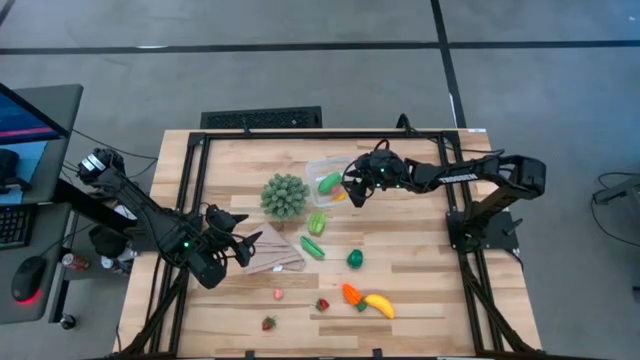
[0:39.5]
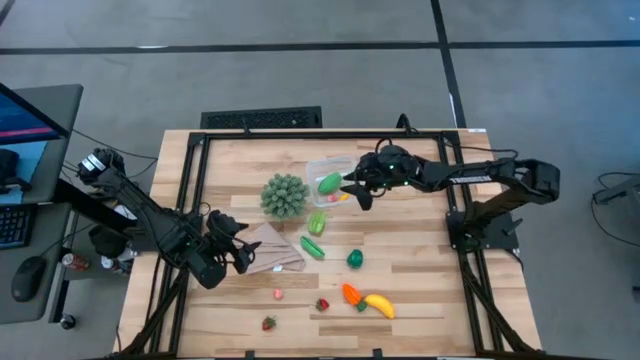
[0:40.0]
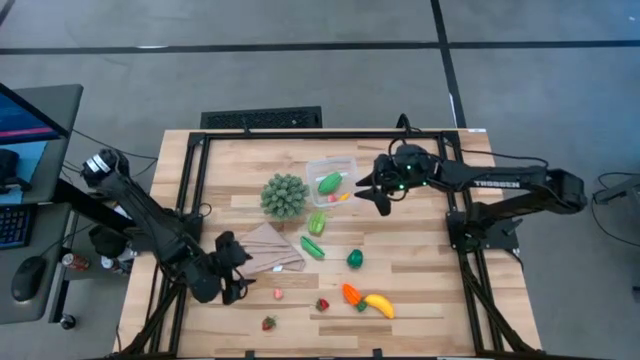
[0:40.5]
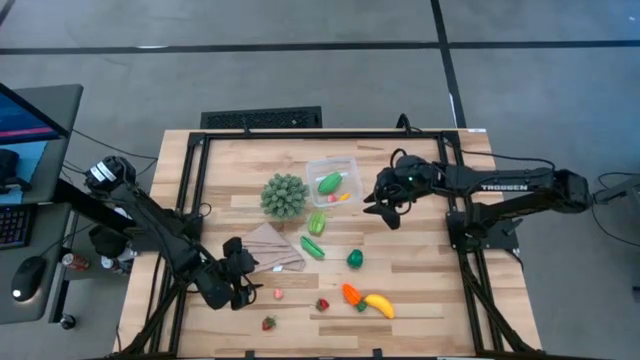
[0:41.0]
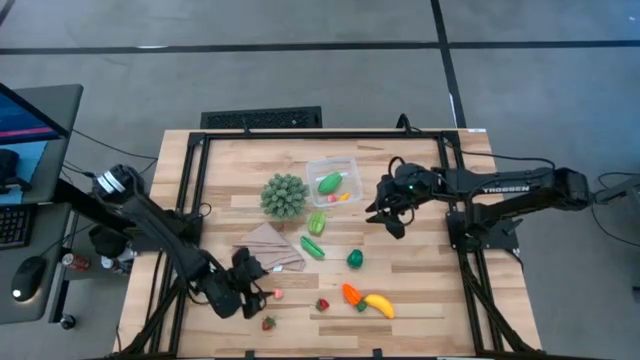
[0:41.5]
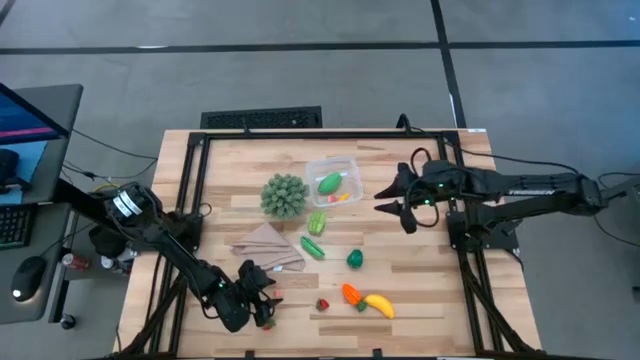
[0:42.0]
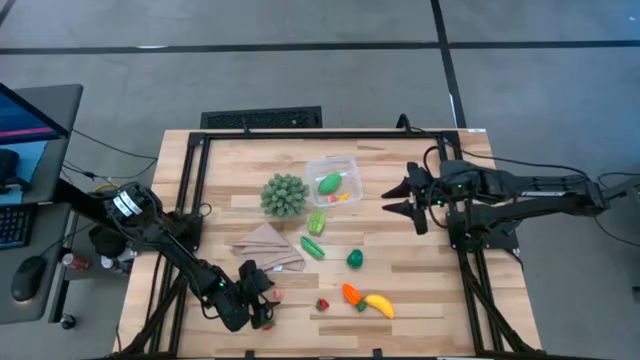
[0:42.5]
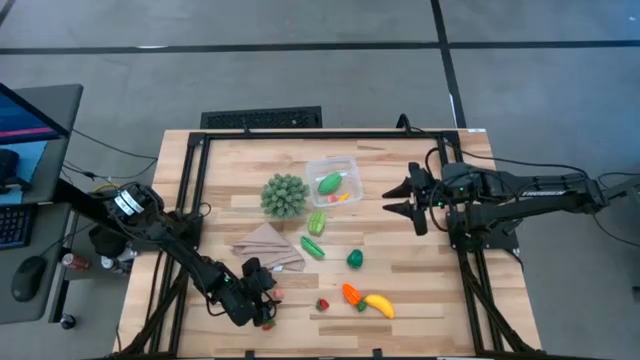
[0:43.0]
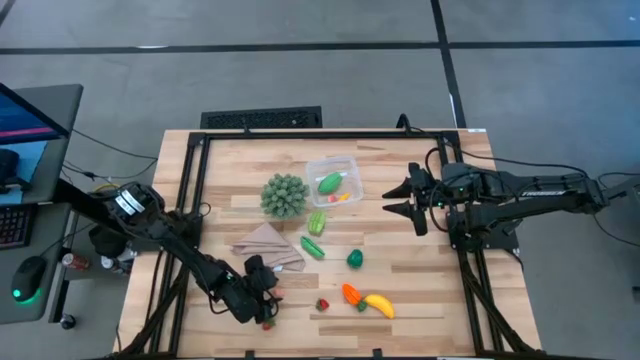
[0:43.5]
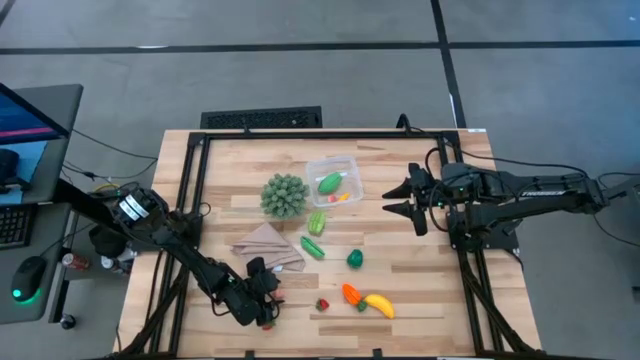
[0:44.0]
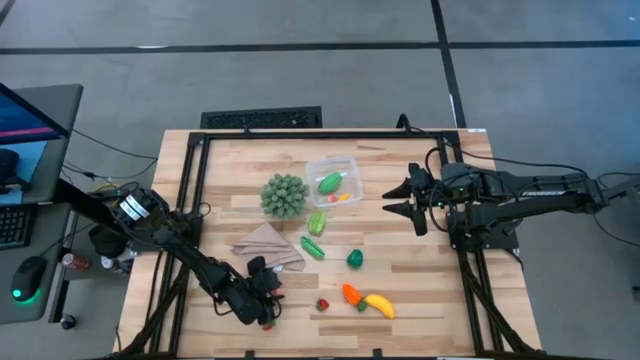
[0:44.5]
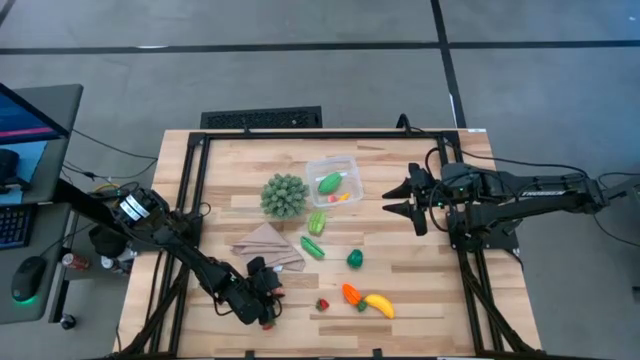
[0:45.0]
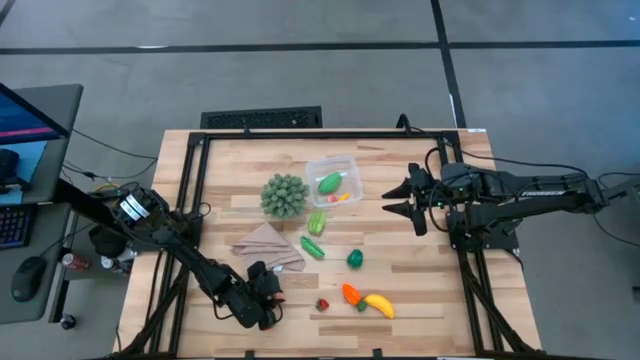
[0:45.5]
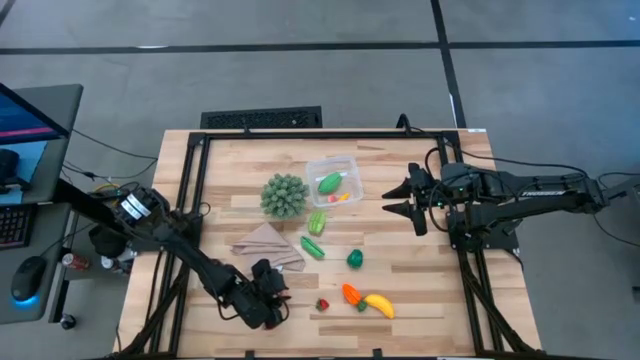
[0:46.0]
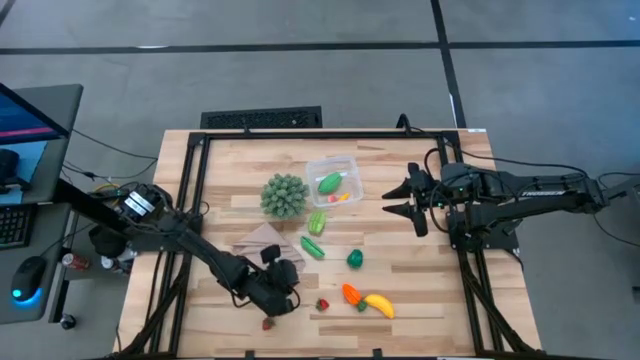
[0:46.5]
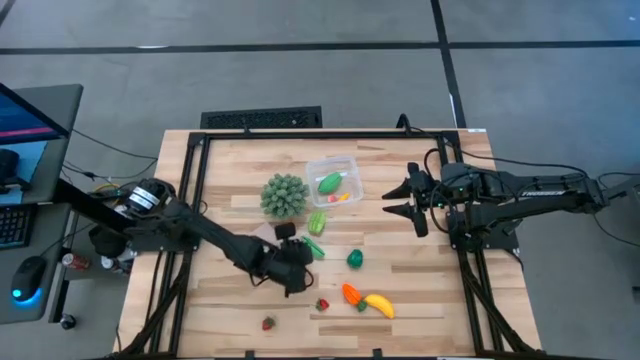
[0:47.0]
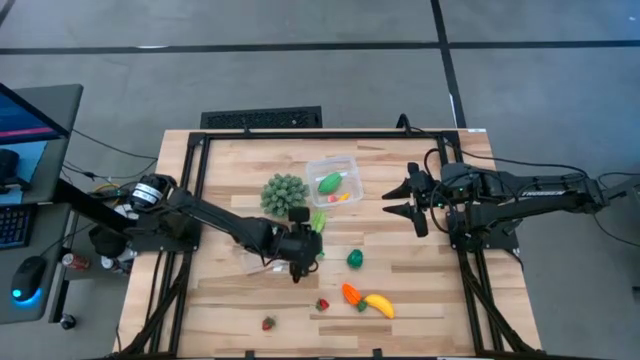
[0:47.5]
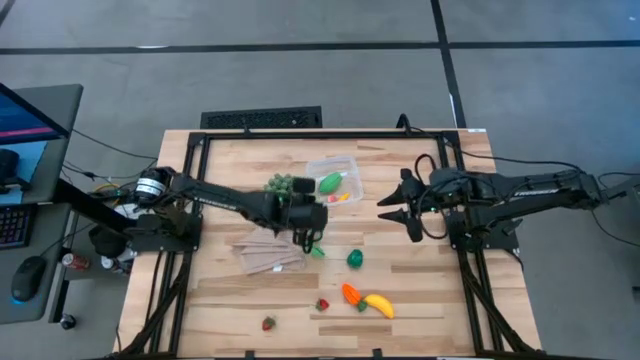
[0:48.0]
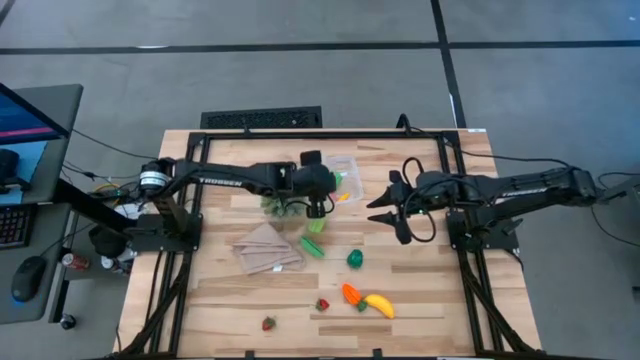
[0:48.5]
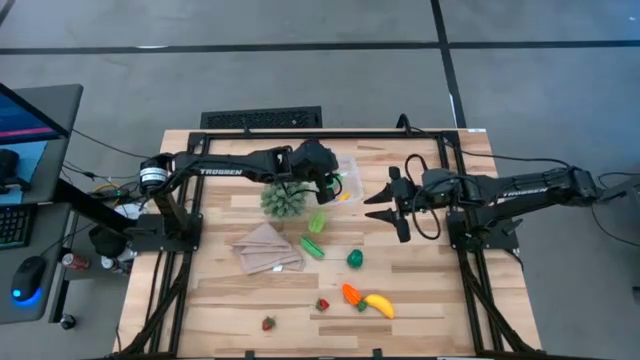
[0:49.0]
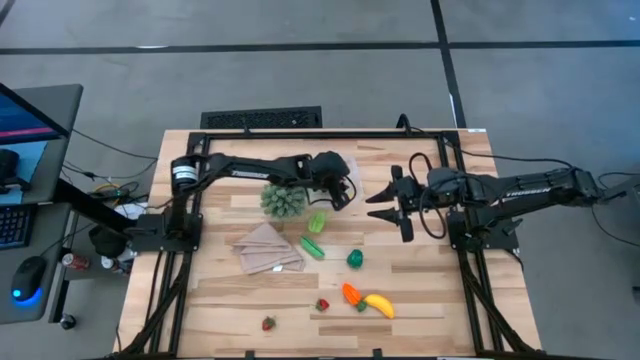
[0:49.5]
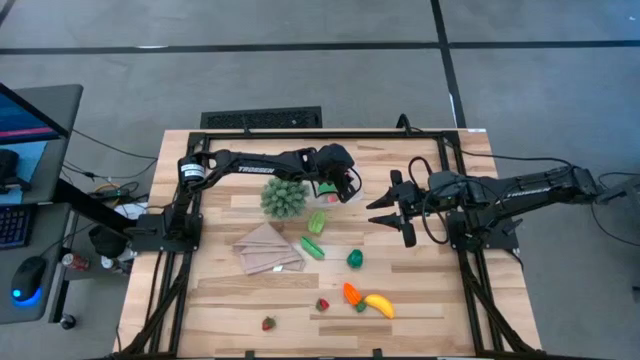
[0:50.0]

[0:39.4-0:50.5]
Task: Pick and placing Produce into tupperware
Put the pink peach into the transparent bin

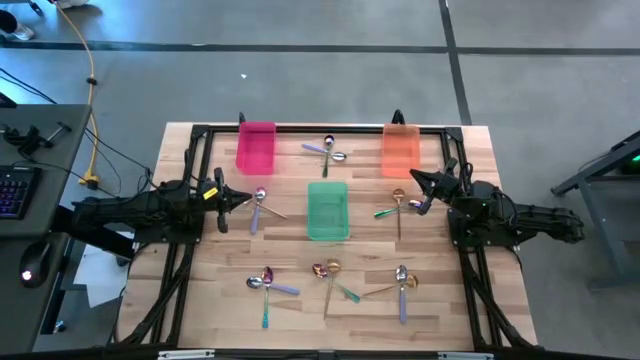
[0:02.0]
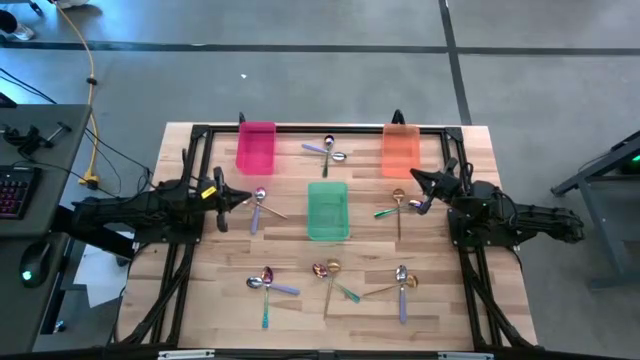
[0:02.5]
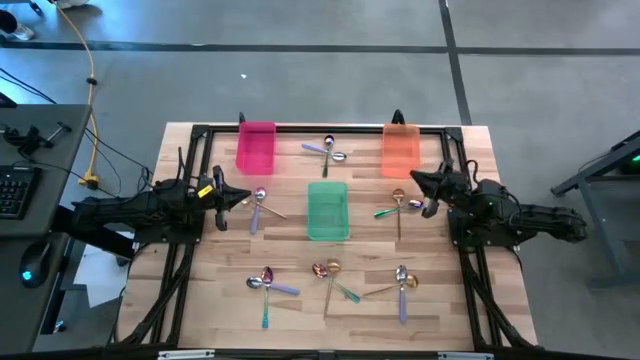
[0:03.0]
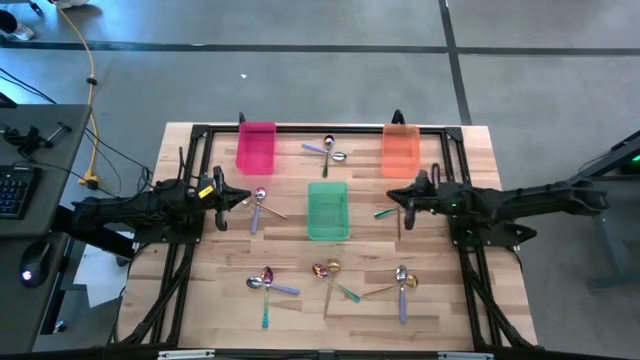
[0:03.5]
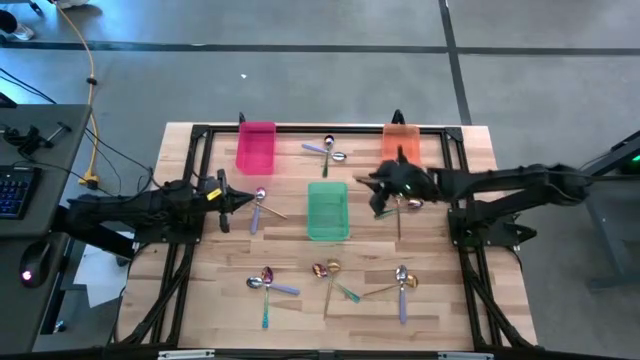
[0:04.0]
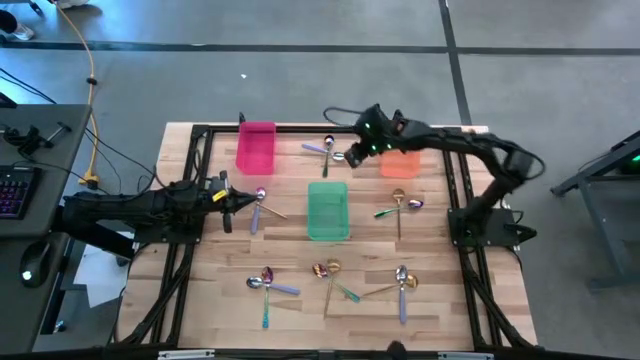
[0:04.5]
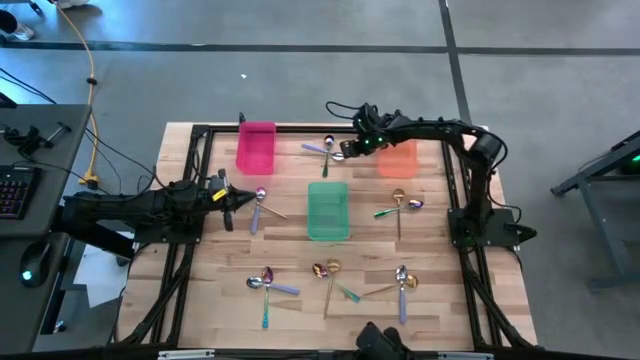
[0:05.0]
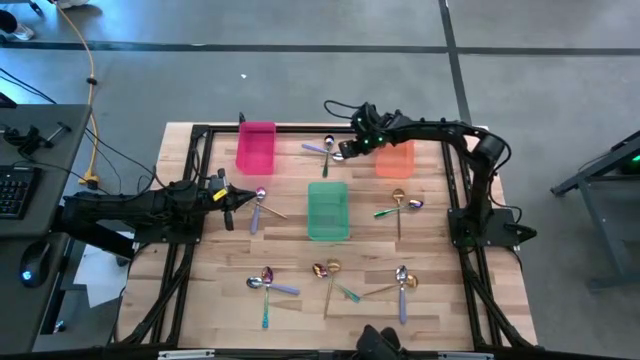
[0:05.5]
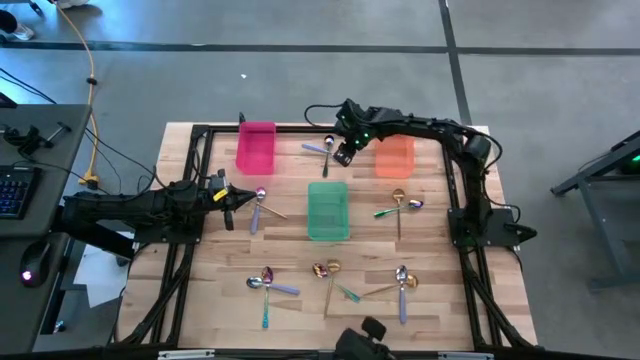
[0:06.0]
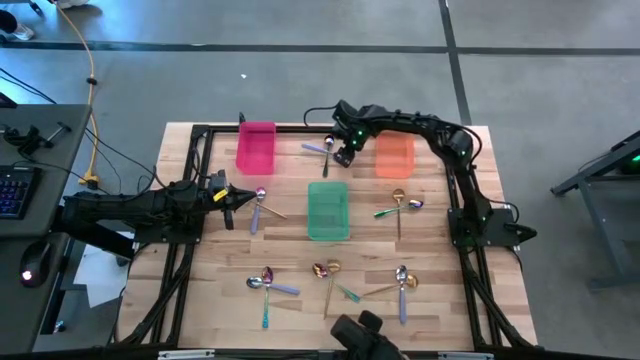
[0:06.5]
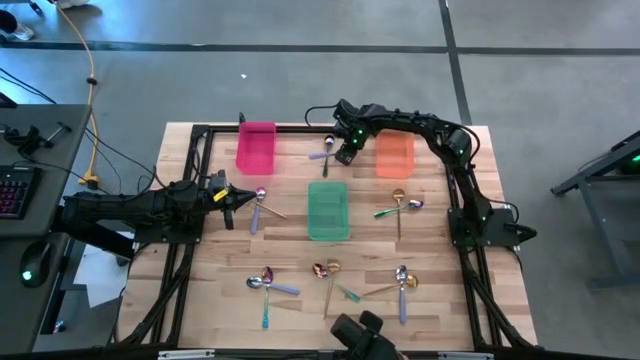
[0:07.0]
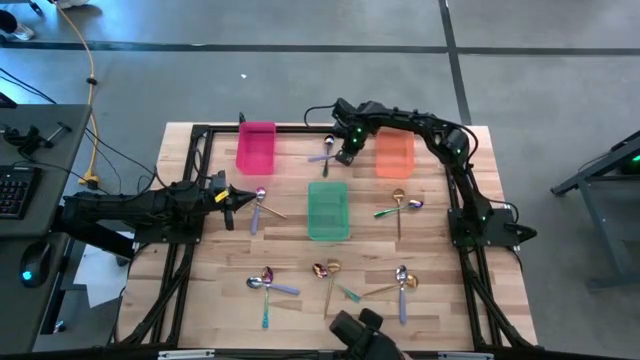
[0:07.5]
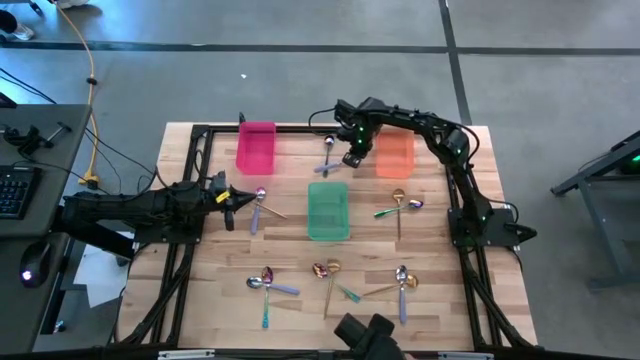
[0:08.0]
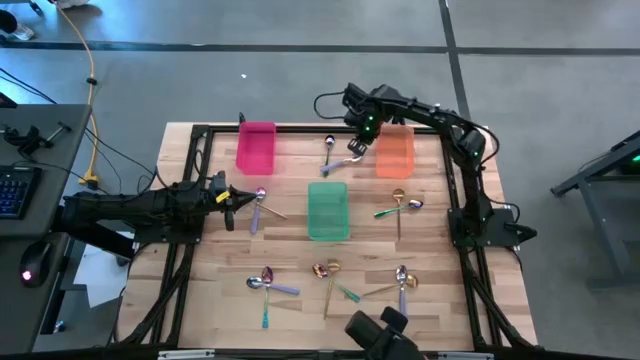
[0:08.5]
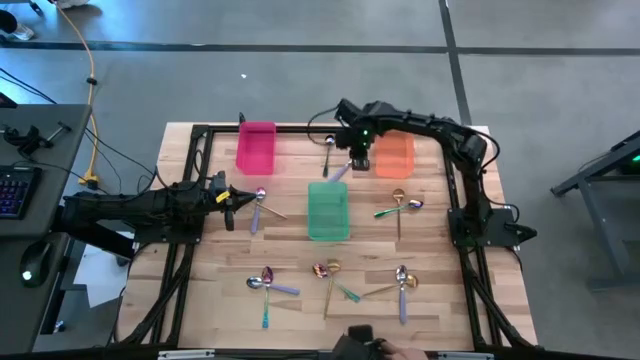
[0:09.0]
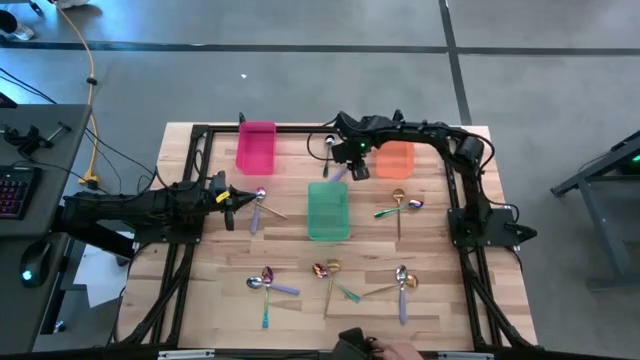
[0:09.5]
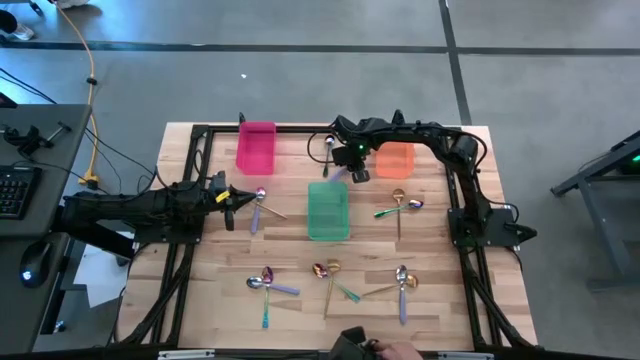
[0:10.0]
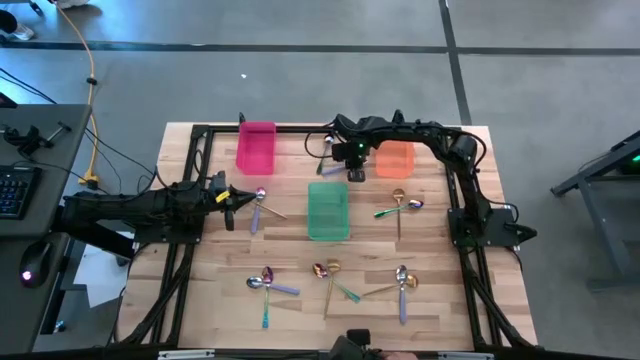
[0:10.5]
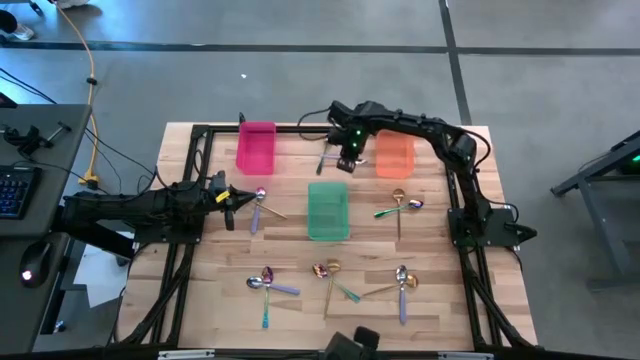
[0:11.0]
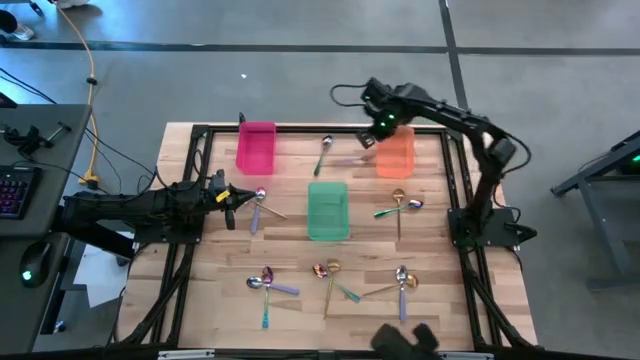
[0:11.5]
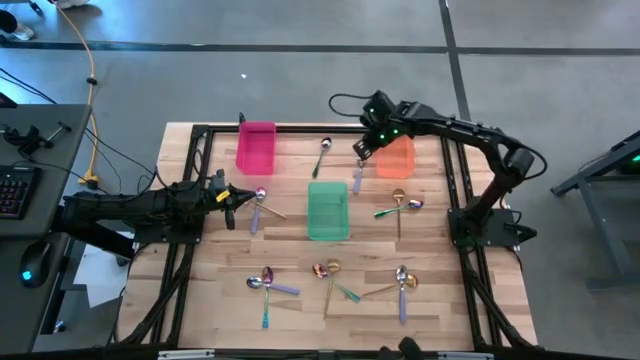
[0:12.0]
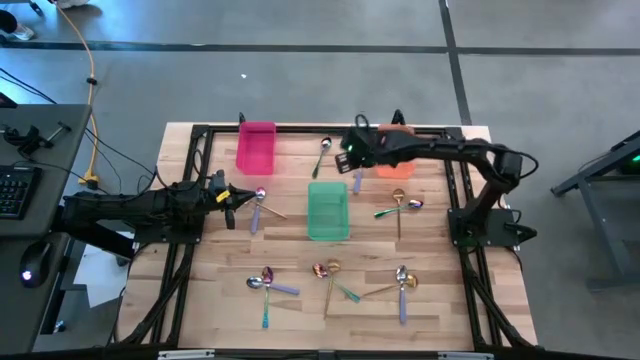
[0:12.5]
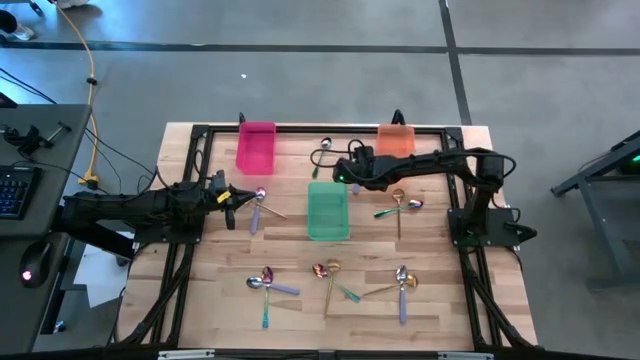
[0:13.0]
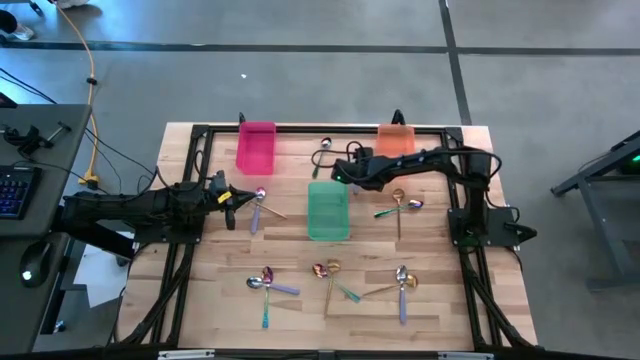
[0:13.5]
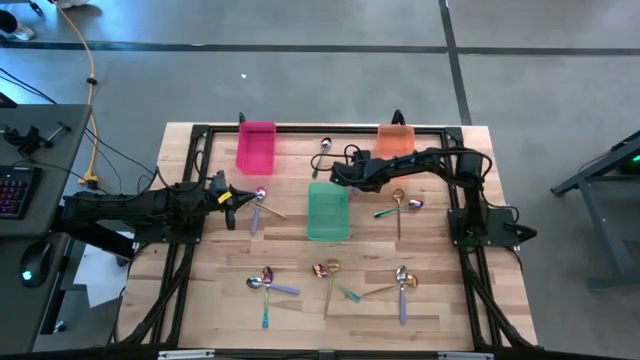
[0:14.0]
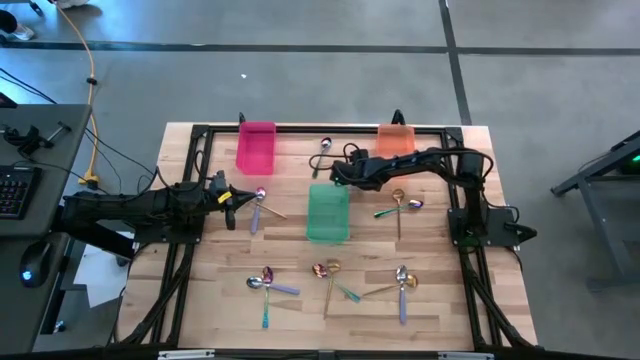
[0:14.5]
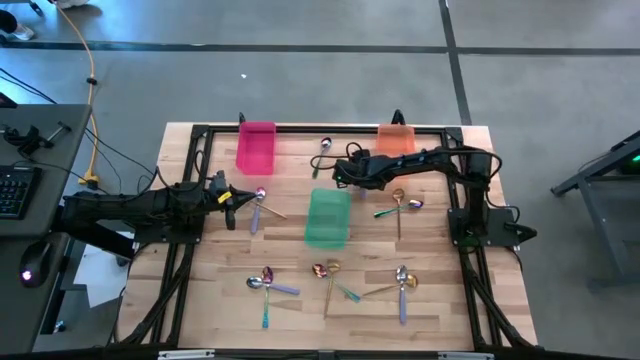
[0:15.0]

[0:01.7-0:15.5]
Task: Sort silverware by color (type)
Put the top center purple spoon into the orange bin
